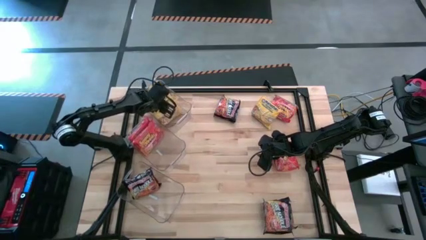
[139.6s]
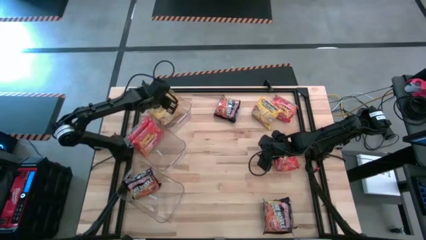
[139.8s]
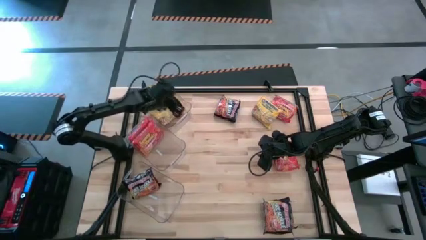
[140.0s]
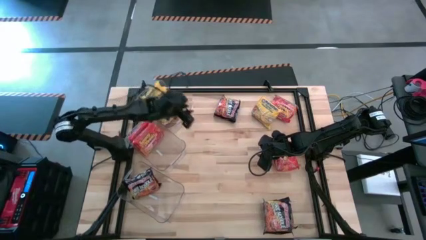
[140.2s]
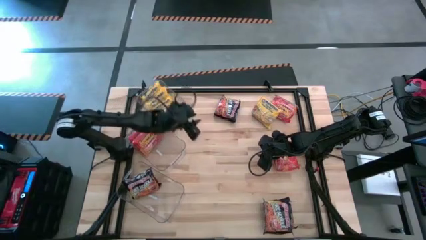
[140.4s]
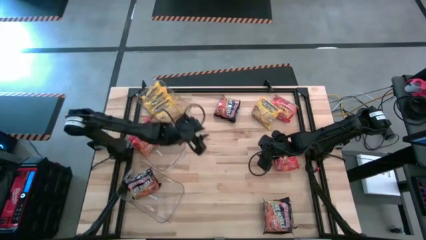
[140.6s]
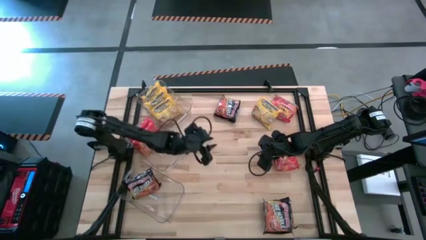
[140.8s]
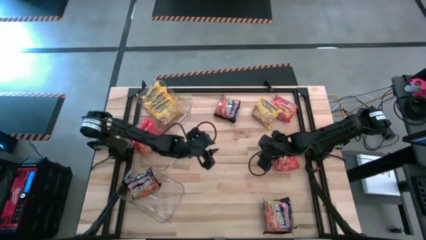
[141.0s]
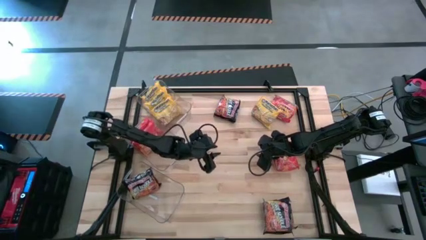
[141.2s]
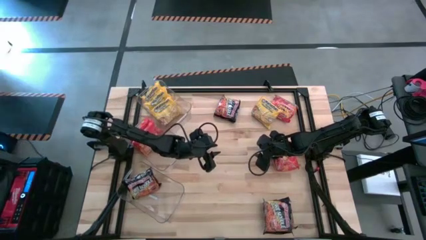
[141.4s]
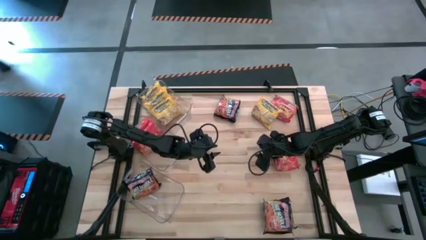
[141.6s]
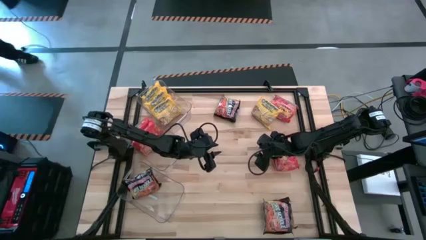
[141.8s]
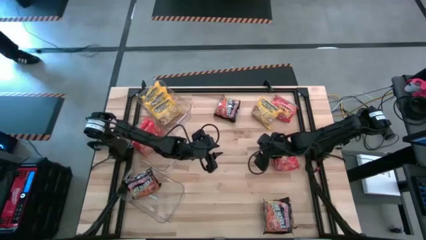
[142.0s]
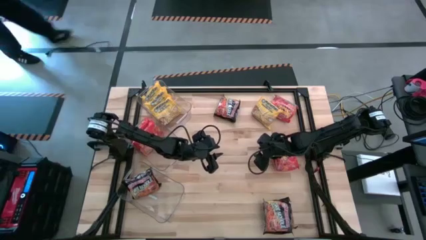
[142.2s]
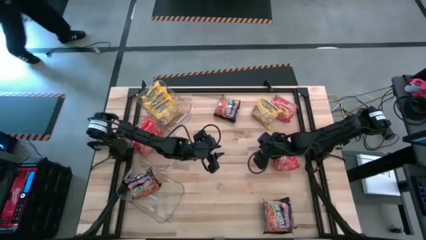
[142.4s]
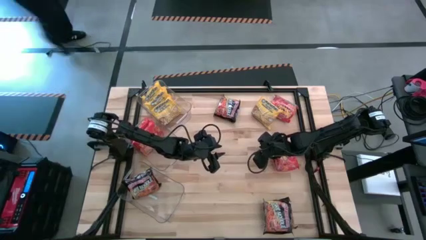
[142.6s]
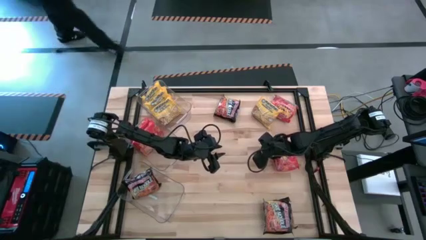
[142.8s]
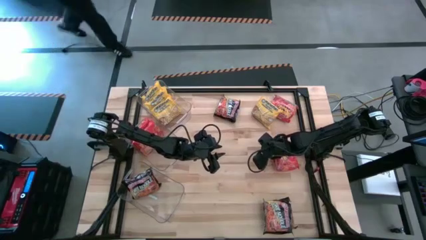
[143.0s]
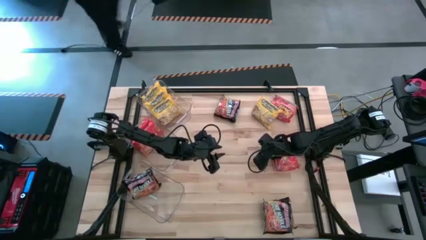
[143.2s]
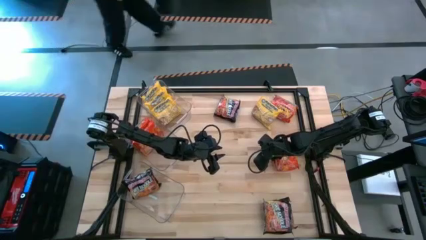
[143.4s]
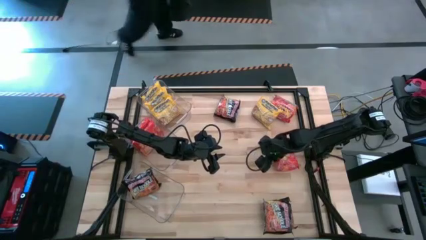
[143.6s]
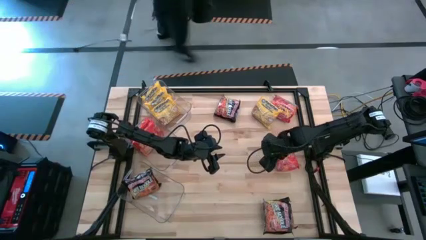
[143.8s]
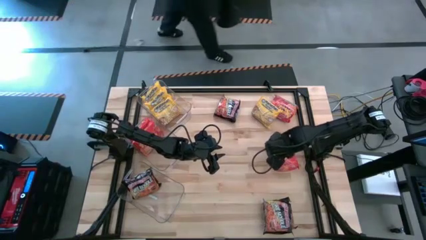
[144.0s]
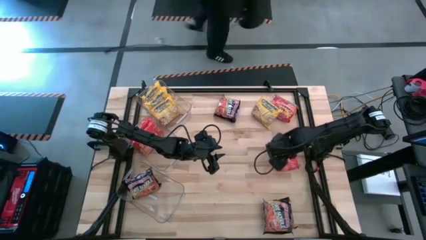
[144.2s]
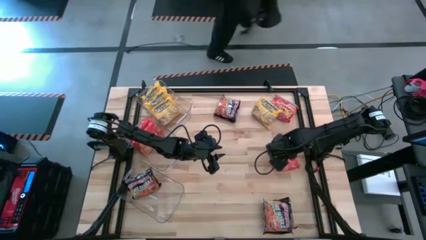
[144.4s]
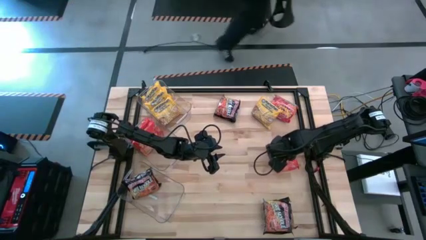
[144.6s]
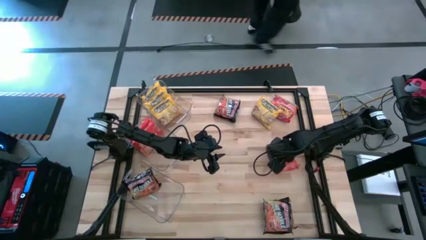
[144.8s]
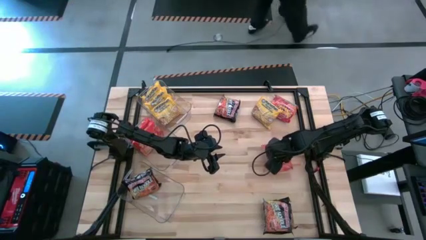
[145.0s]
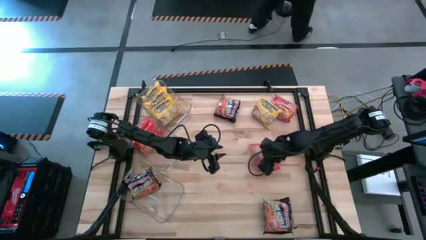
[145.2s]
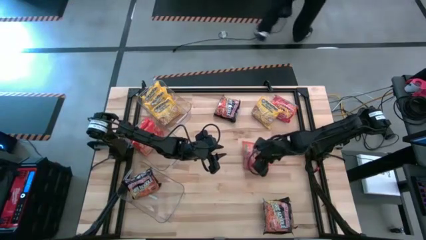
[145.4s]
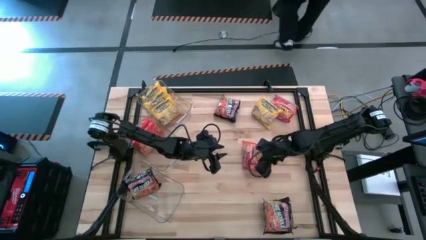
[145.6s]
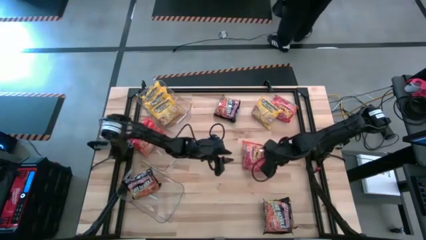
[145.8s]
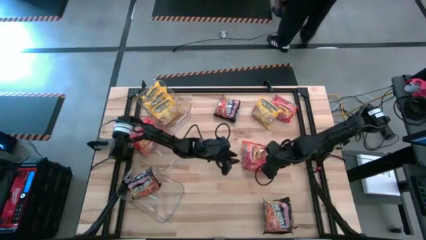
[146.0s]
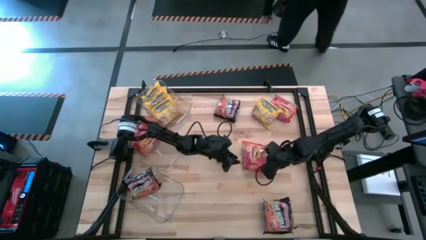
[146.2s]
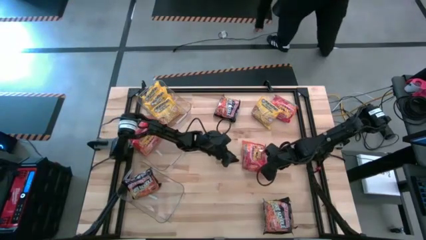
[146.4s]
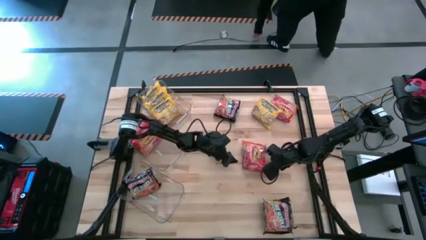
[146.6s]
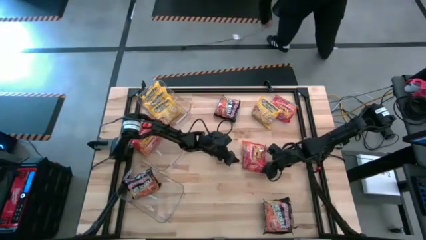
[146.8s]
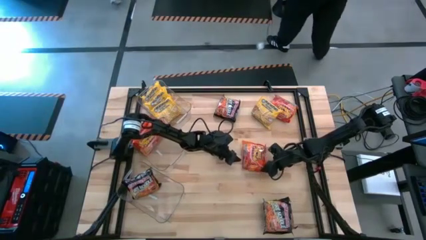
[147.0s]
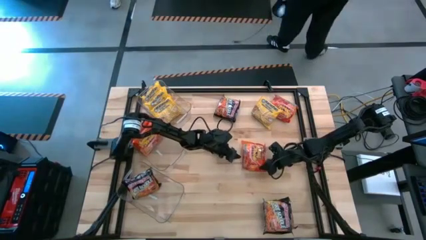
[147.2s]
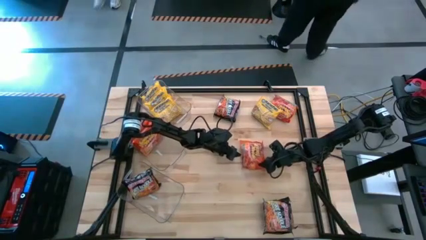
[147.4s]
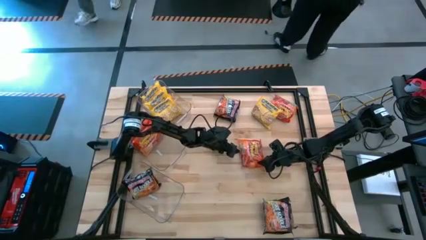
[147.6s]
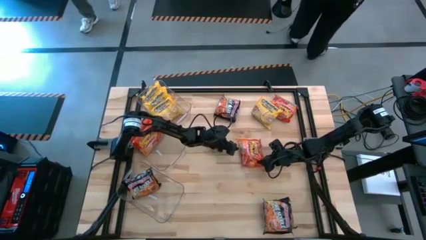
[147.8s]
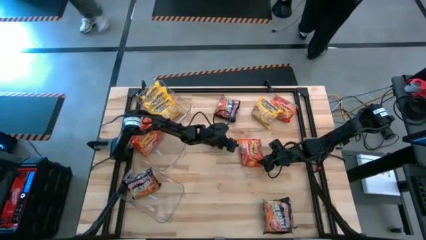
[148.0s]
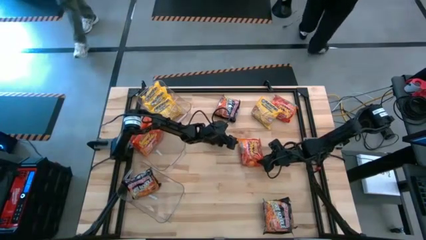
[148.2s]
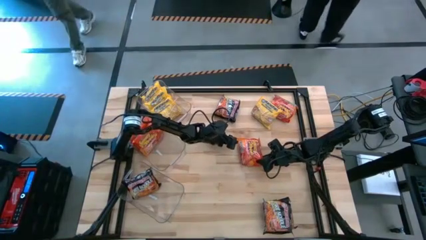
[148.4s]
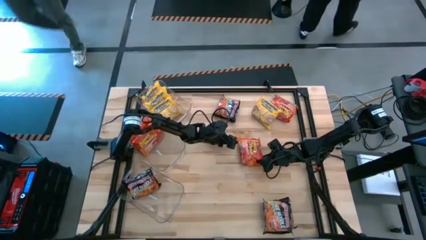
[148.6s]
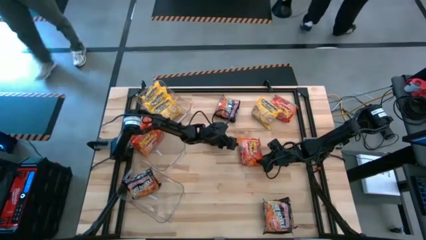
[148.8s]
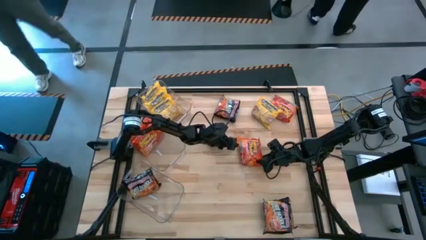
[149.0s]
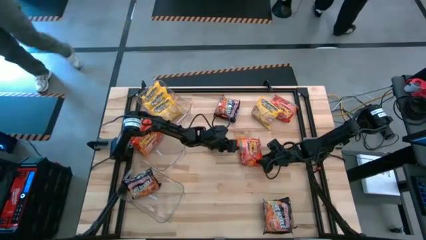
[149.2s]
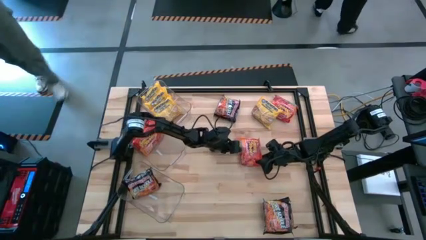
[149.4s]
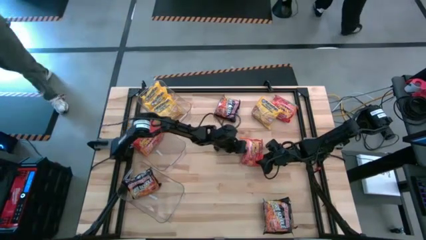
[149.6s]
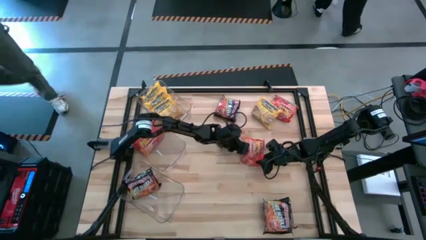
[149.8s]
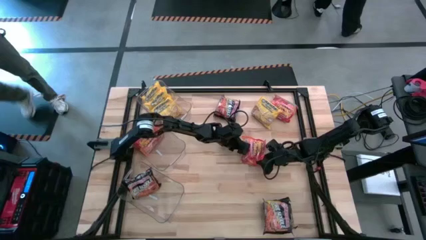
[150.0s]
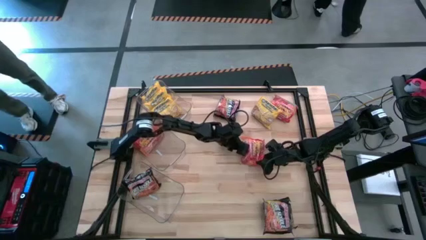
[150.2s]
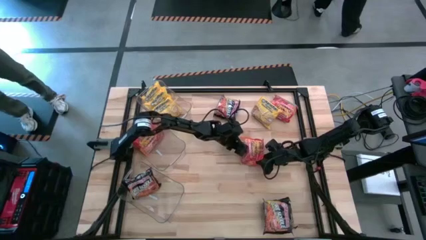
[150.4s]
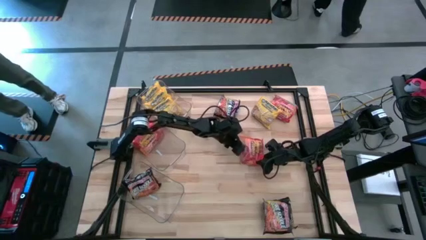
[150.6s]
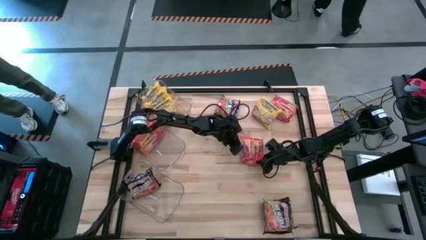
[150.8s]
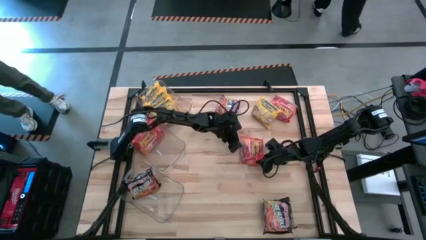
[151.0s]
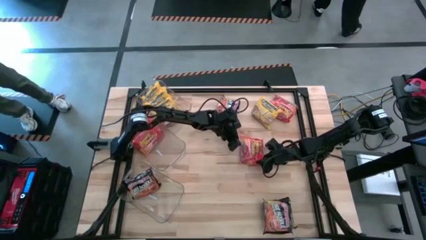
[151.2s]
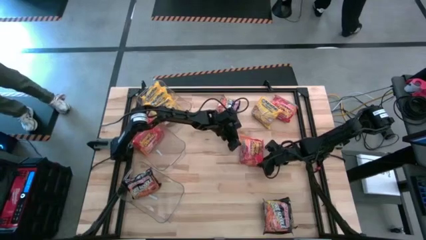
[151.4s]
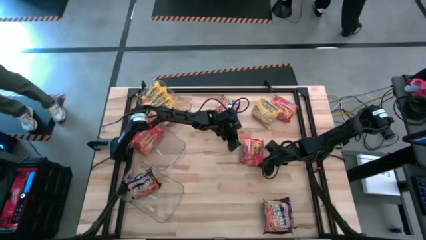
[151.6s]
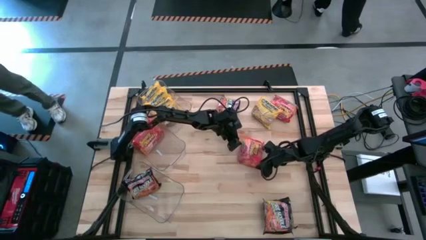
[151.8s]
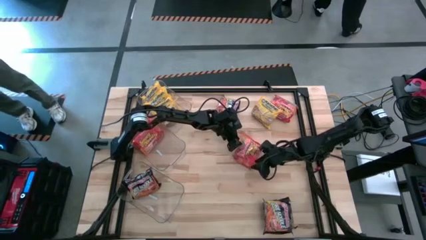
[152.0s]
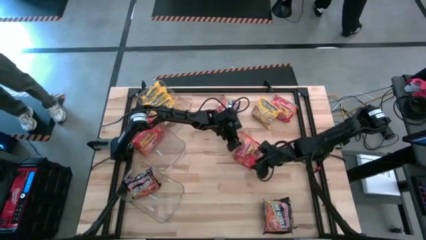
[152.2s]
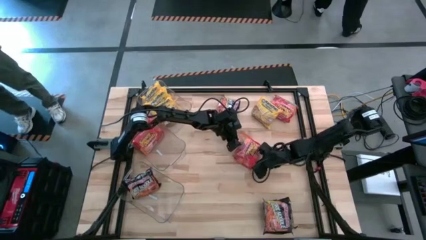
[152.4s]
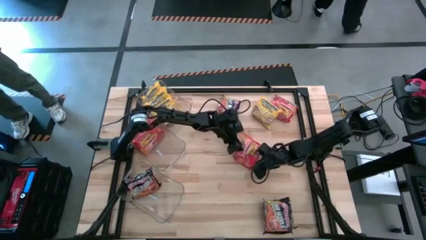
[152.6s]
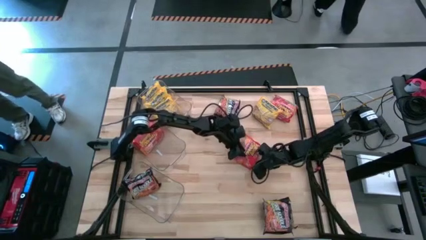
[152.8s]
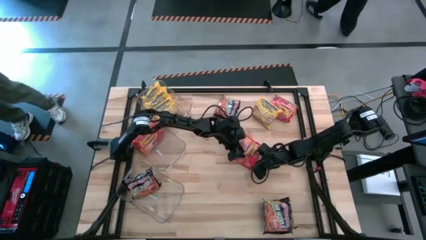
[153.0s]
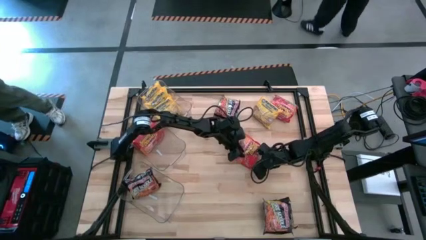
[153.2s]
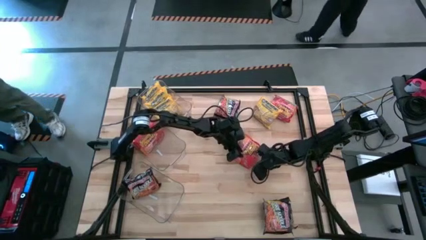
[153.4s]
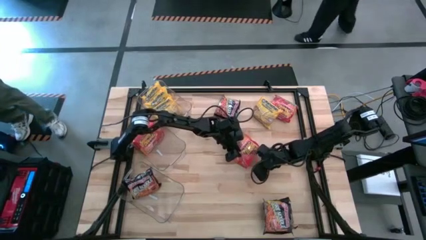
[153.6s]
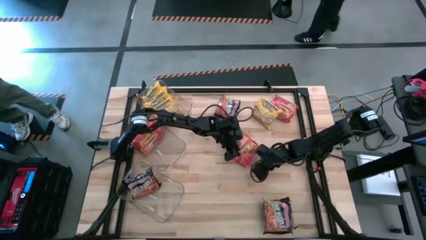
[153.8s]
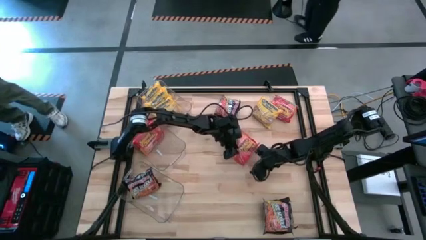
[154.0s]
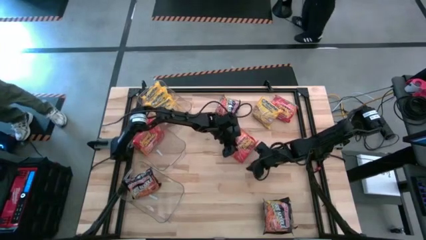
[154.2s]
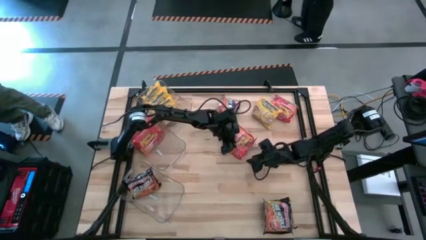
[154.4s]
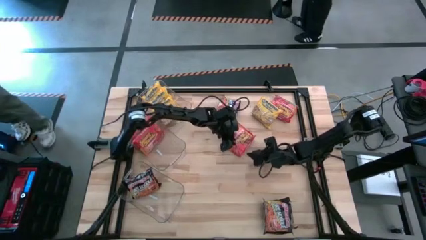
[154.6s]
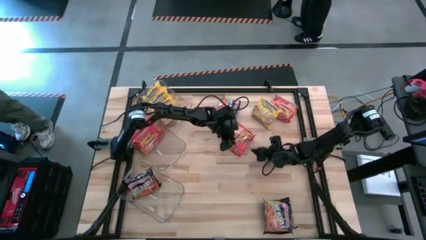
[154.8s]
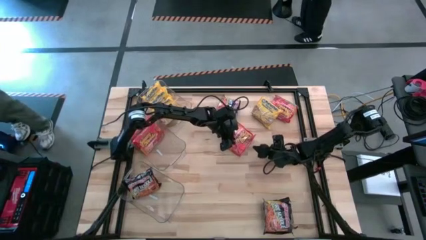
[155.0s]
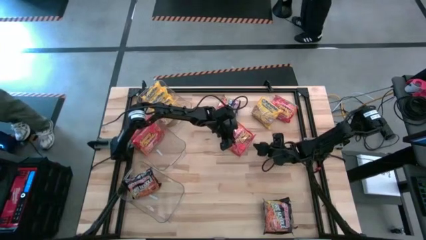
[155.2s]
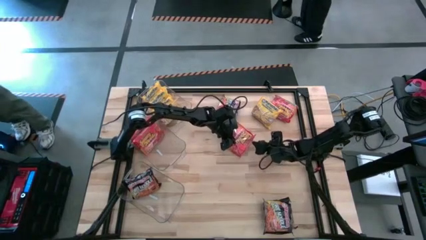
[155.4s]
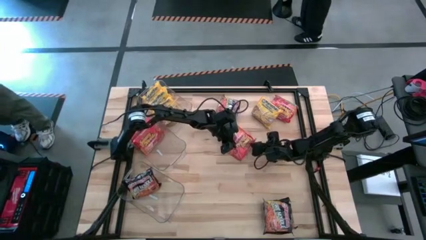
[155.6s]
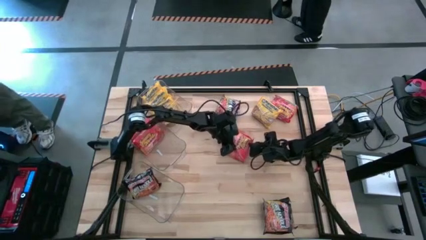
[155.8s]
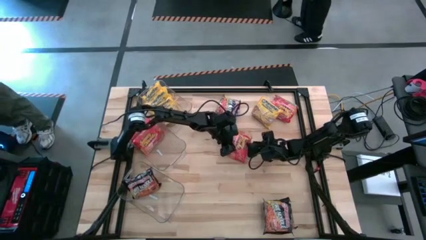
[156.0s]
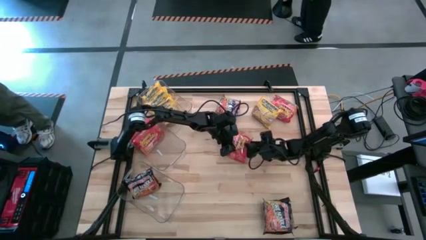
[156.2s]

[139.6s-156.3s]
Task: Sort Maruchan noodles
Put the orange noodles pack into the middle transparent bin
